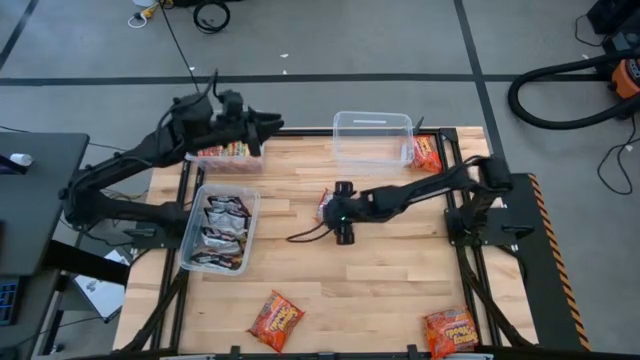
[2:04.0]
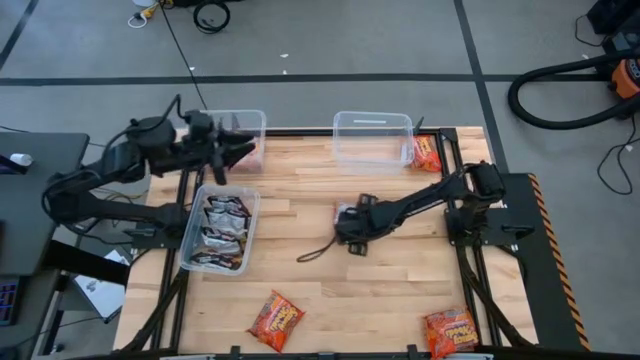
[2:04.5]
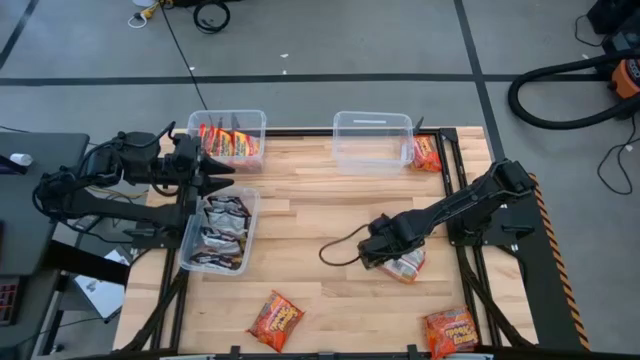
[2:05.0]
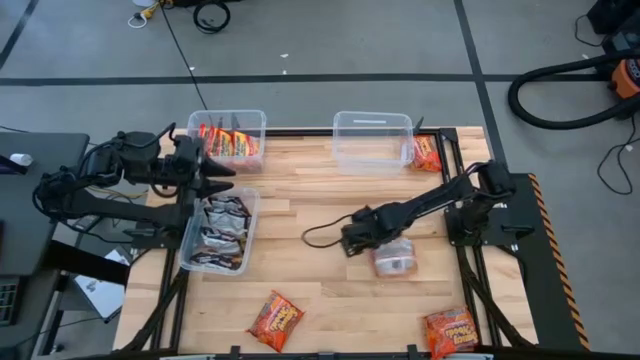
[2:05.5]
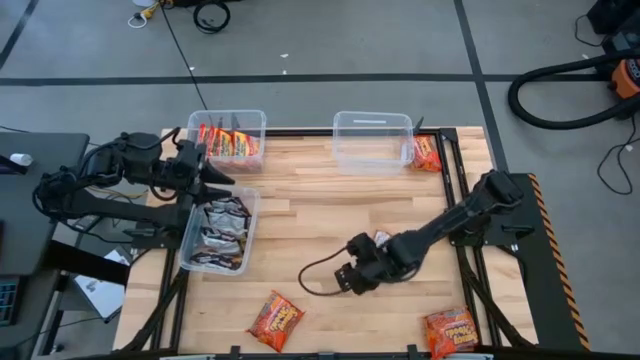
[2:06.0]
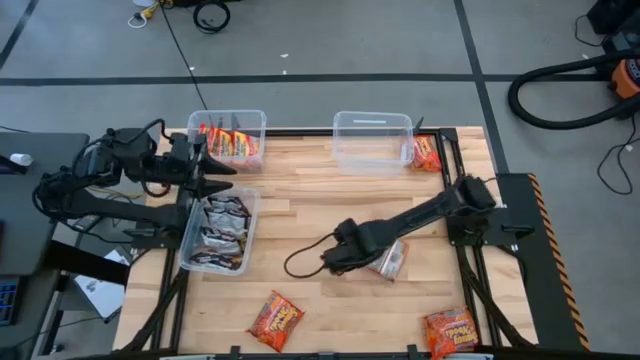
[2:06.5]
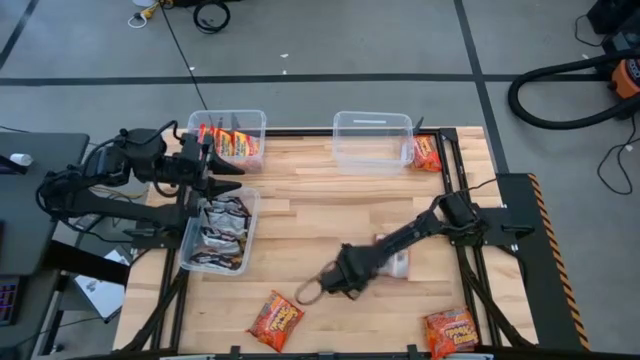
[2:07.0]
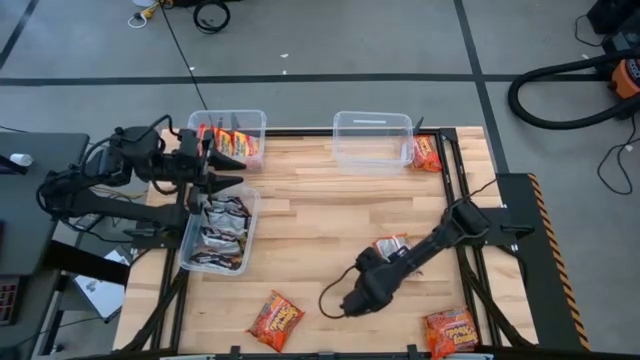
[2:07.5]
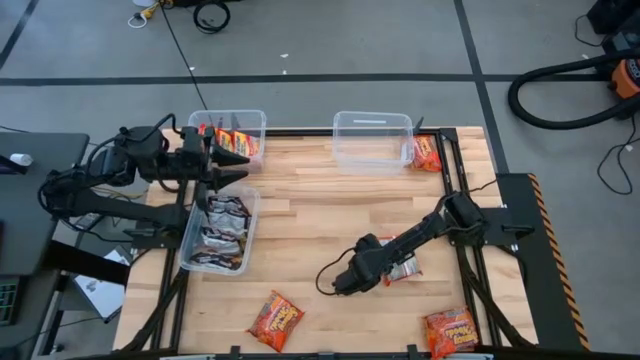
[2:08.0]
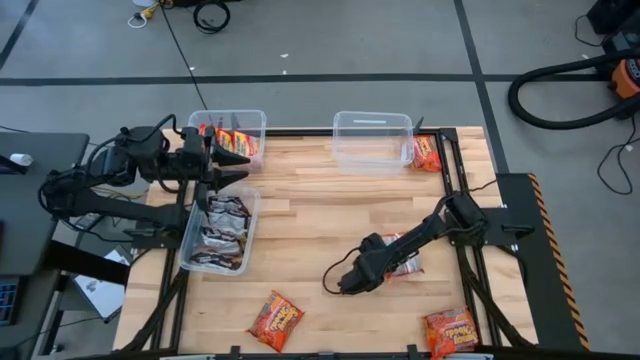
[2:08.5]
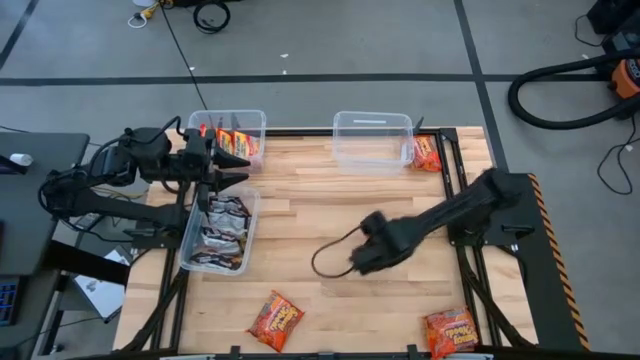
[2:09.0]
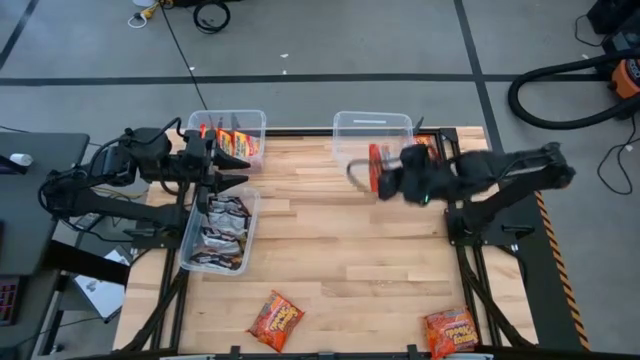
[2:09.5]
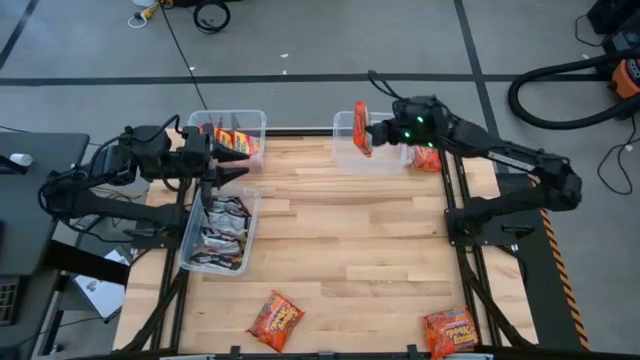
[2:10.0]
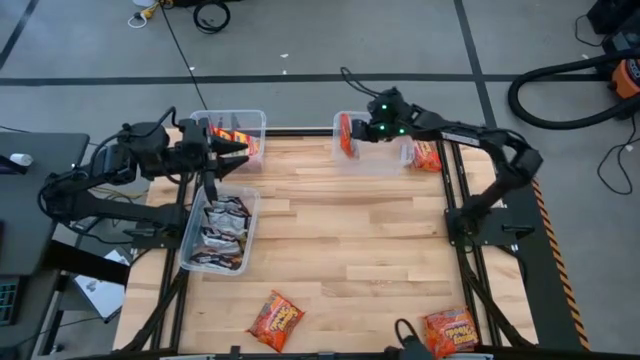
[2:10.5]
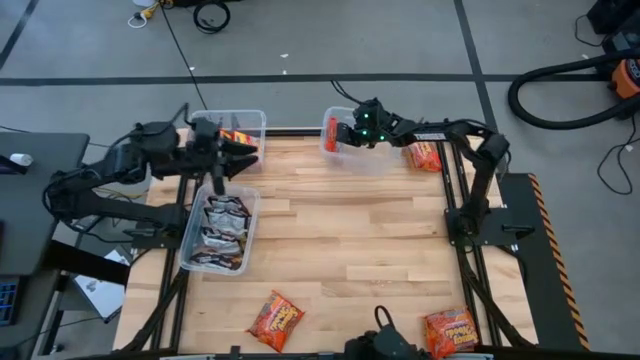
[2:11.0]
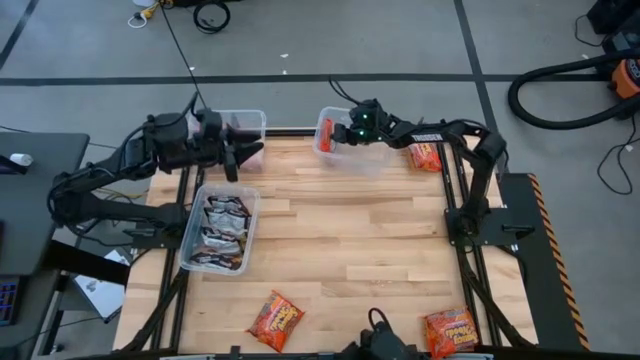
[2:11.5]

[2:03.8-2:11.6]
Task: Sort Maruchan noodles
Put the center orange noodle pack into the right transparent bin

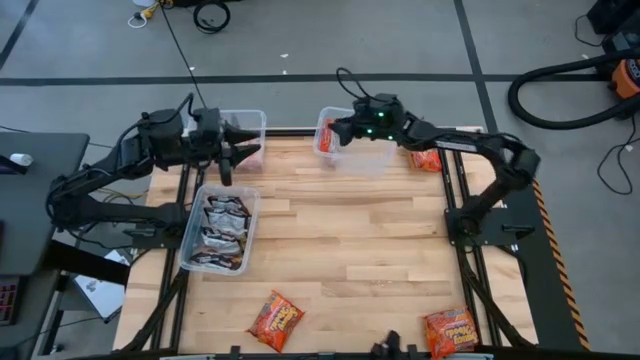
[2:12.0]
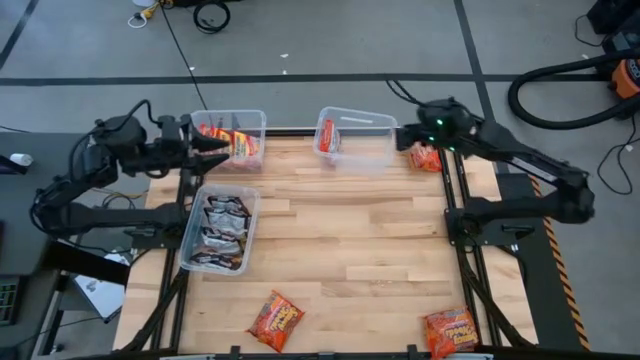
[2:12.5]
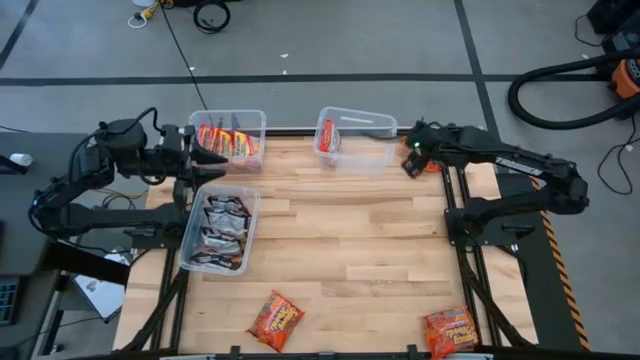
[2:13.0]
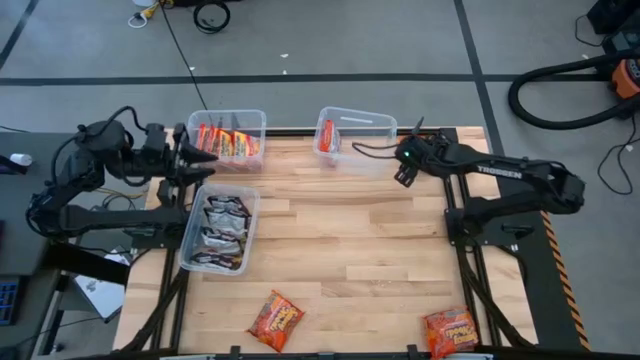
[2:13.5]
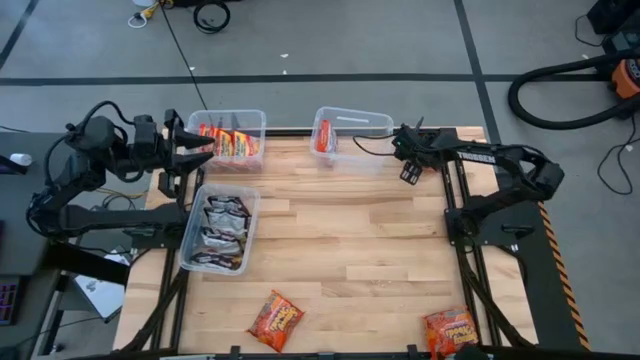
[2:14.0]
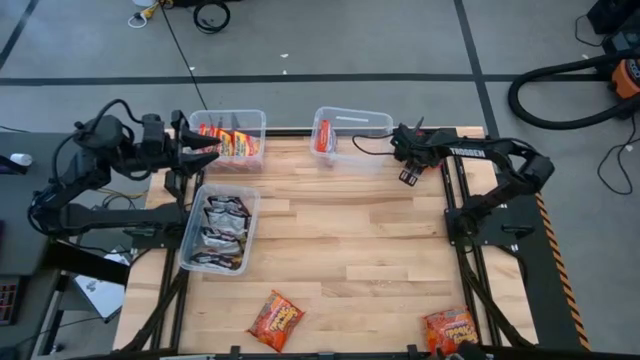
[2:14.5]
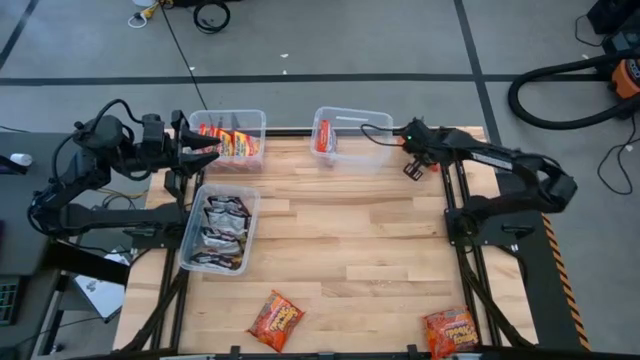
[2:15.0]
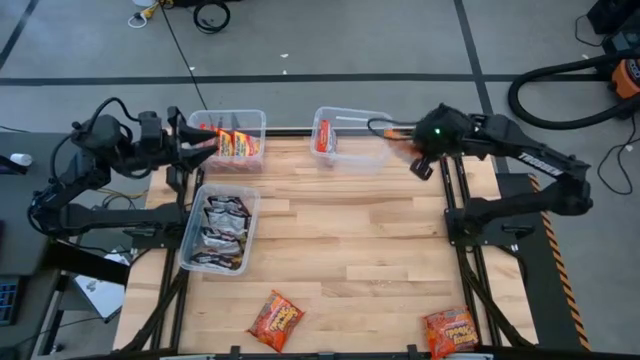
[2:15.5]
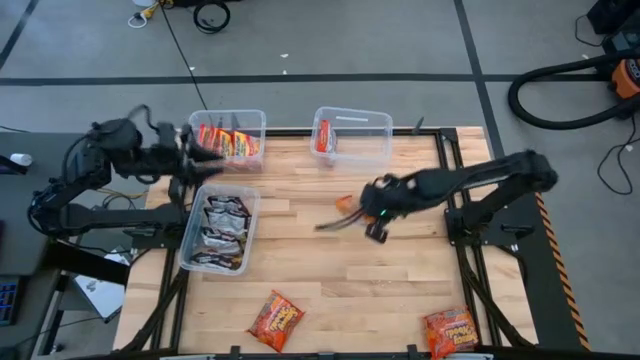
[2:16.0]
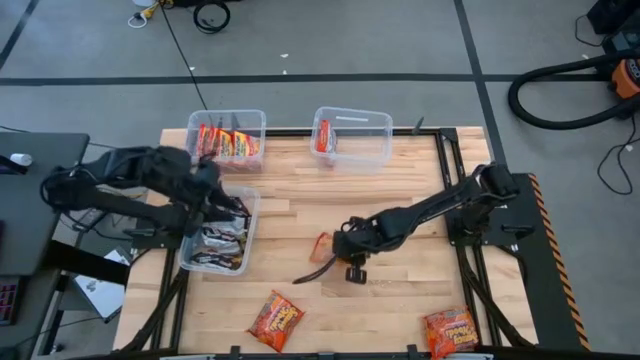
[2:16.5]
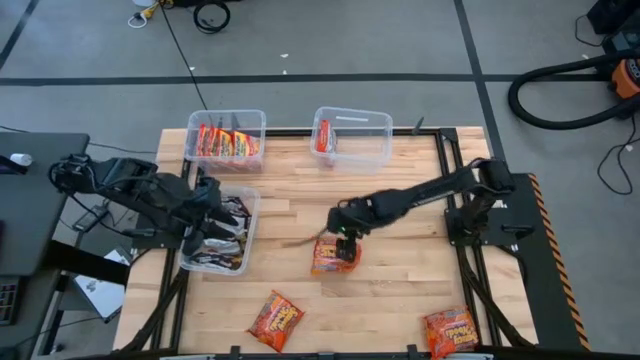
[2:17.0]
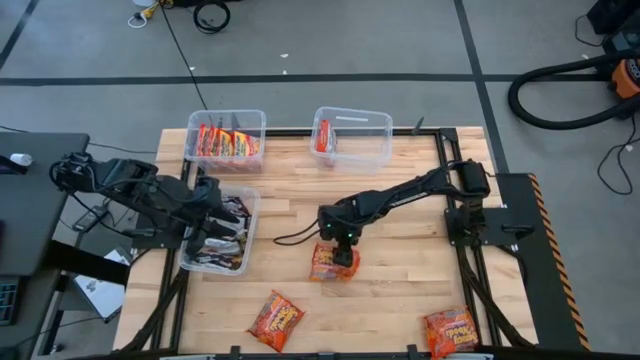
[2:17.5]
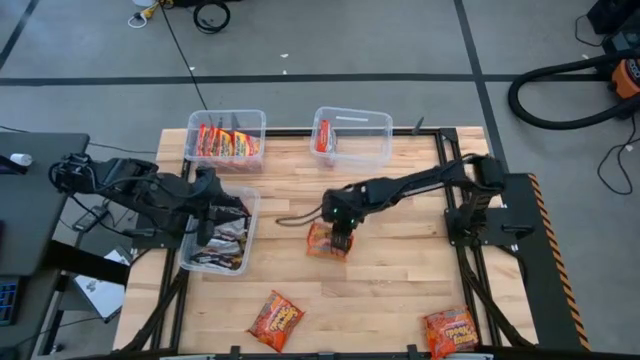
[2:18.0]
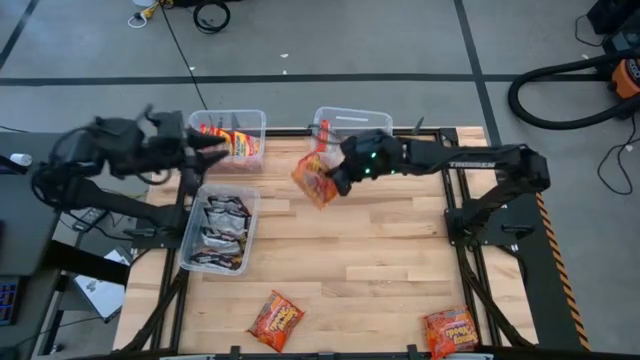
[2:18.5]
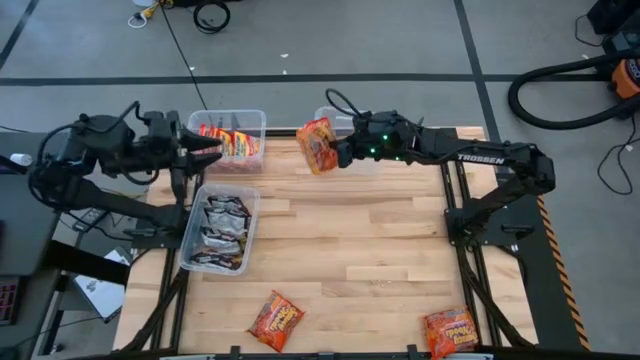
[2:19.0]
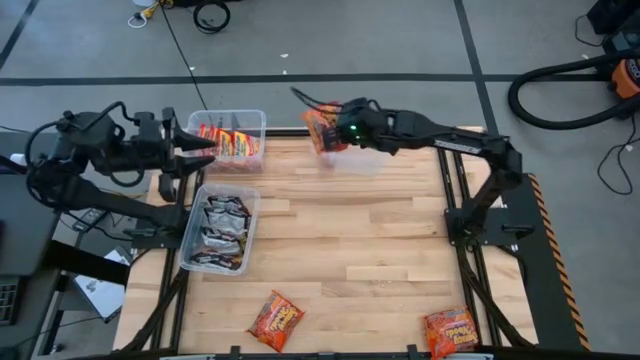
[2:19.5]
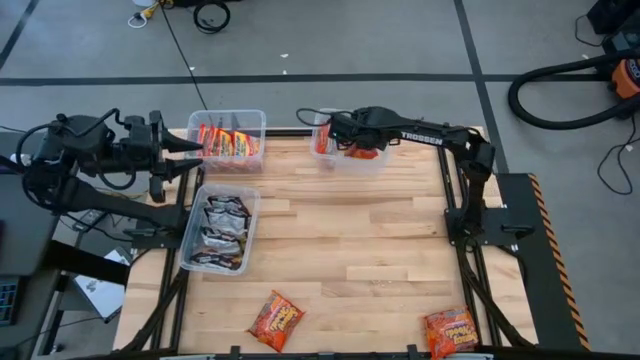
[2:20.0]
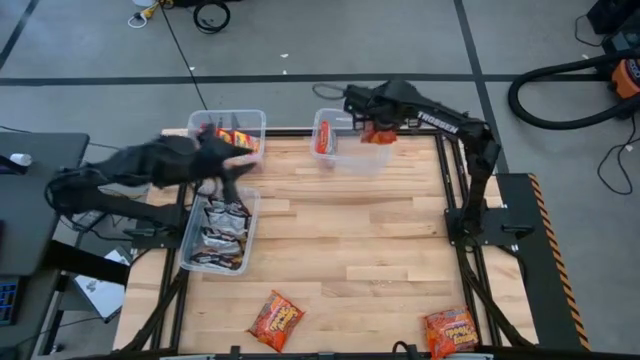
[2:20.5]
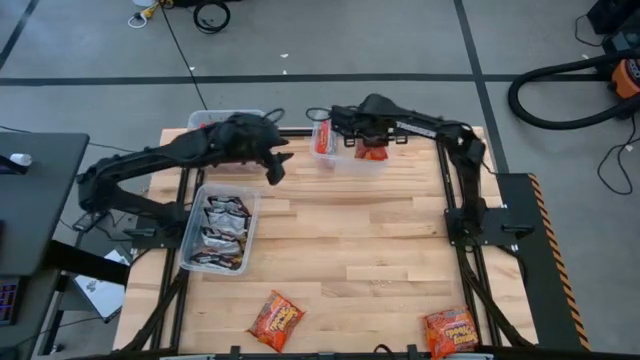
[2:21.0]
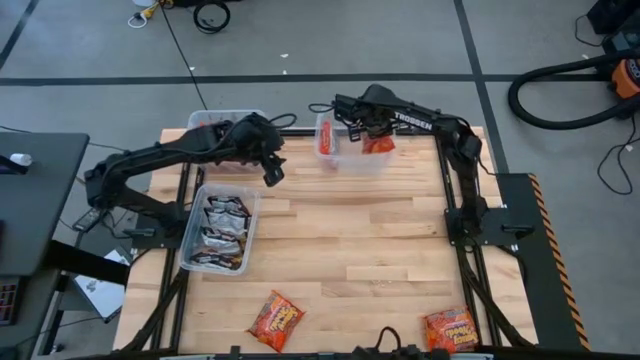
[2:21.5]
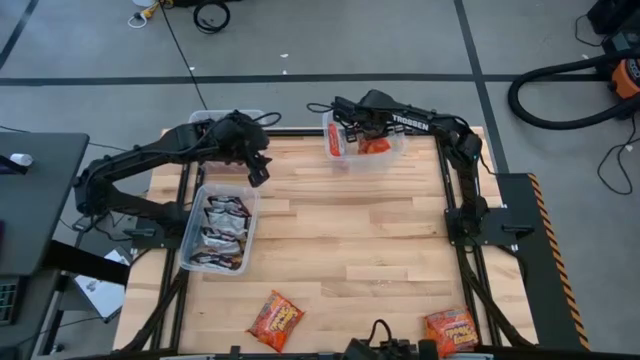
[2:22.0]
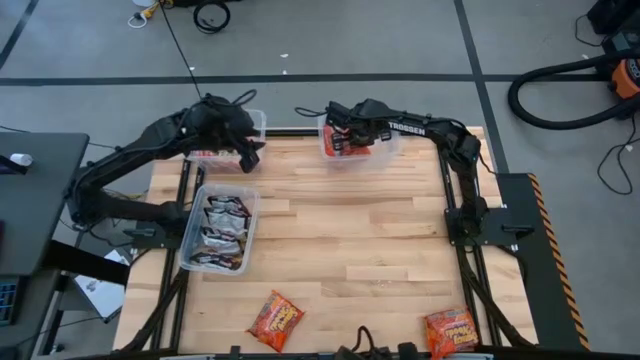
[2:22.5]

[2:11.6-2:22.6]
Put the top right orange noodle pack into the top right transparent bin
